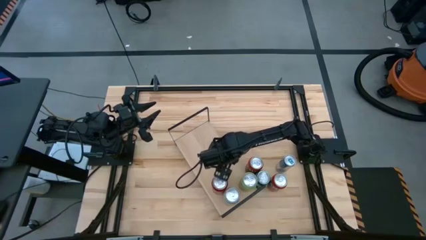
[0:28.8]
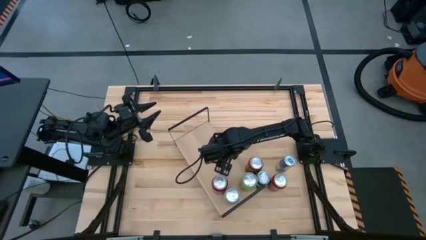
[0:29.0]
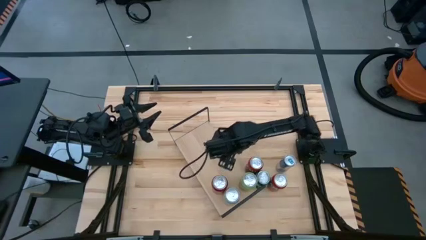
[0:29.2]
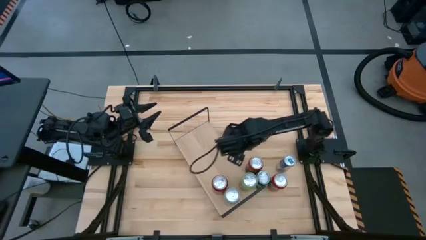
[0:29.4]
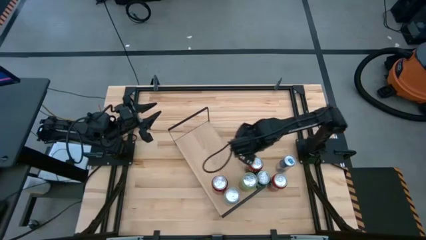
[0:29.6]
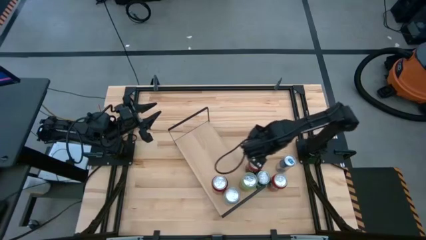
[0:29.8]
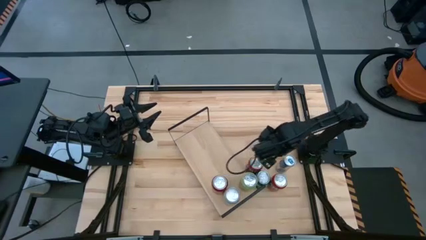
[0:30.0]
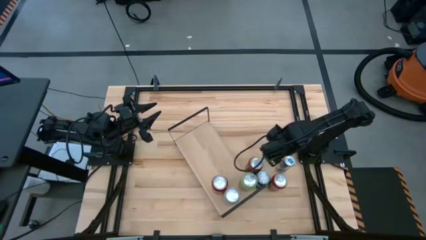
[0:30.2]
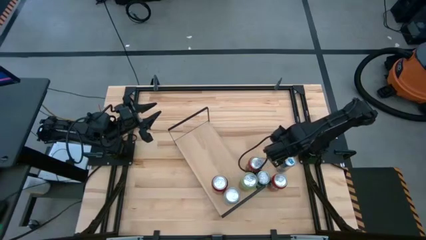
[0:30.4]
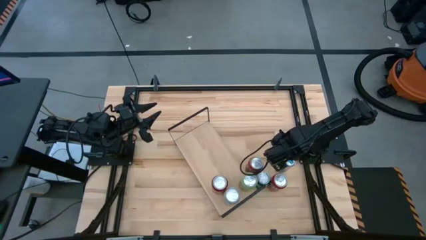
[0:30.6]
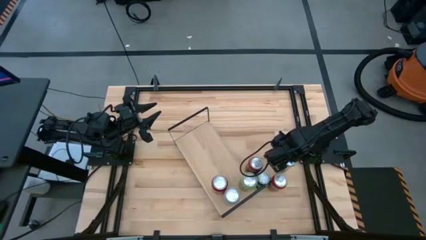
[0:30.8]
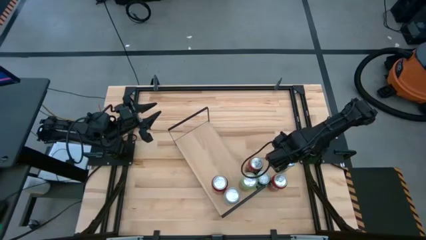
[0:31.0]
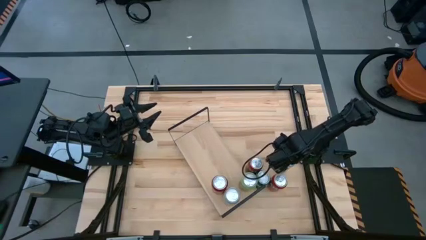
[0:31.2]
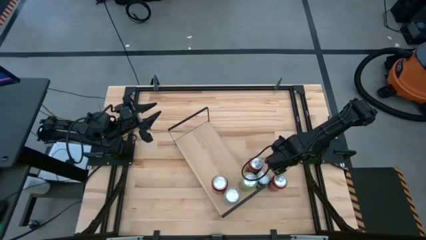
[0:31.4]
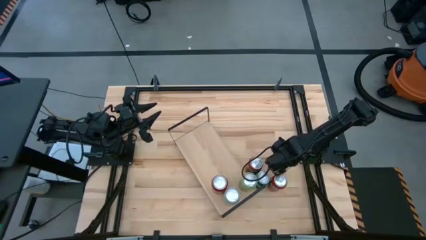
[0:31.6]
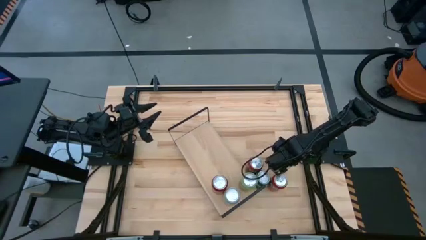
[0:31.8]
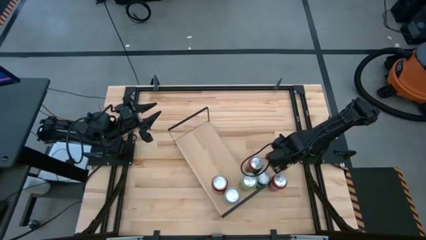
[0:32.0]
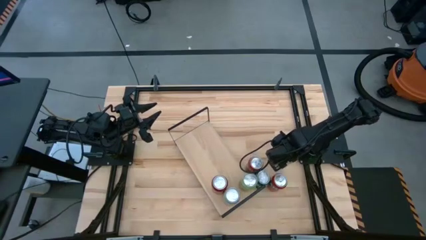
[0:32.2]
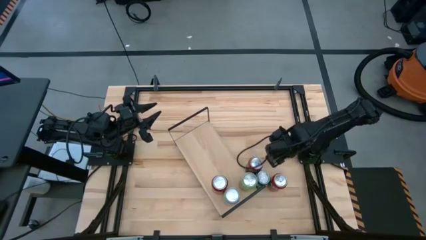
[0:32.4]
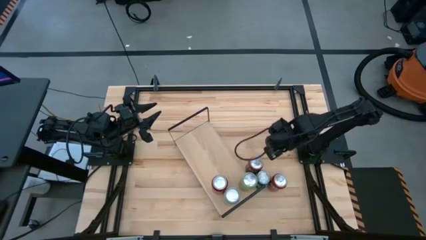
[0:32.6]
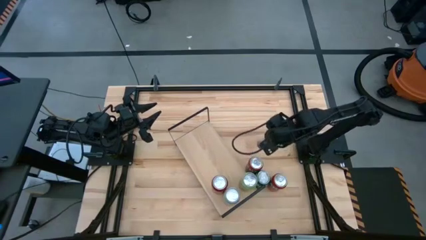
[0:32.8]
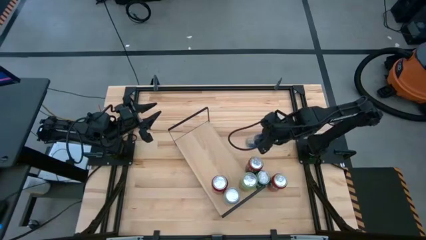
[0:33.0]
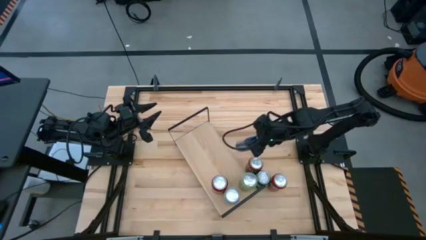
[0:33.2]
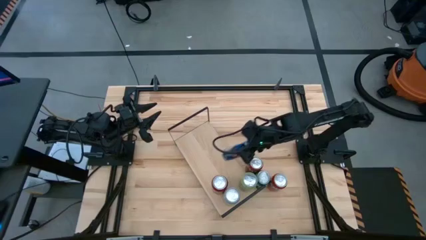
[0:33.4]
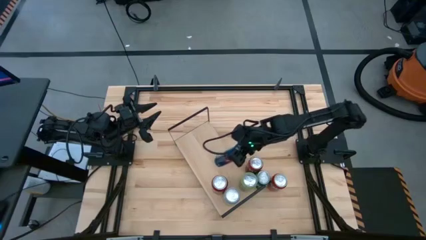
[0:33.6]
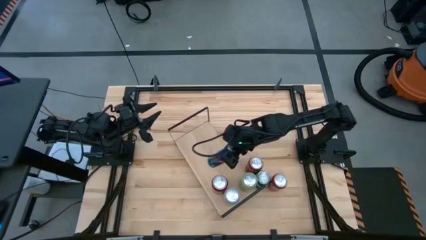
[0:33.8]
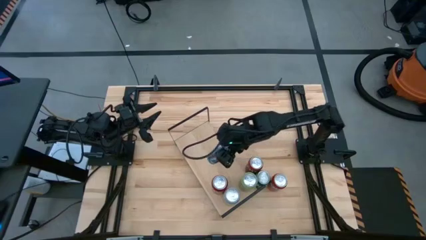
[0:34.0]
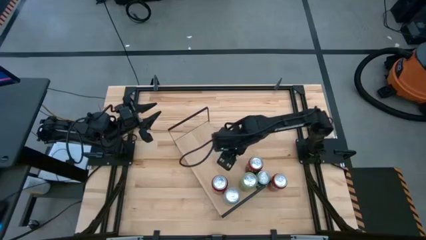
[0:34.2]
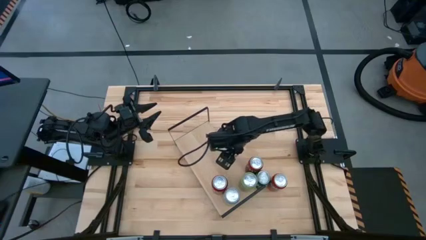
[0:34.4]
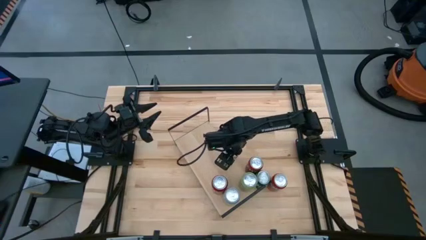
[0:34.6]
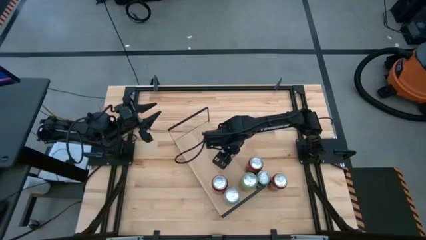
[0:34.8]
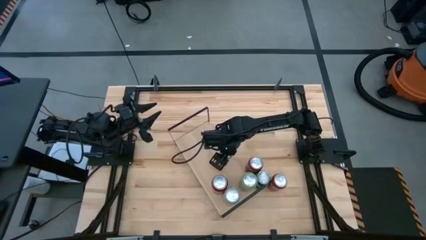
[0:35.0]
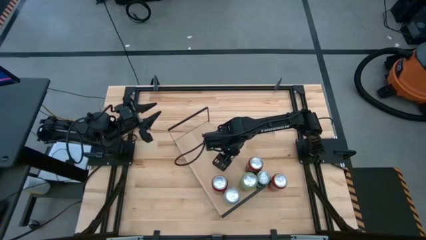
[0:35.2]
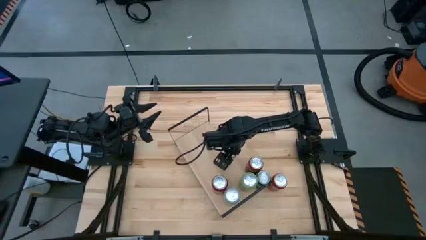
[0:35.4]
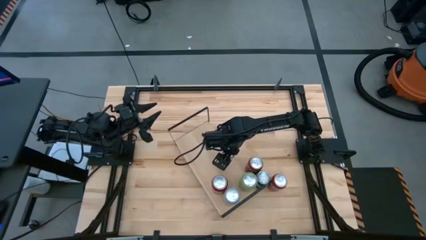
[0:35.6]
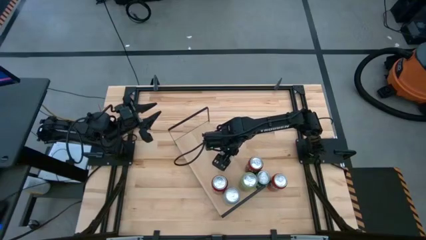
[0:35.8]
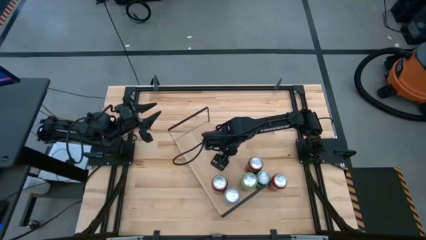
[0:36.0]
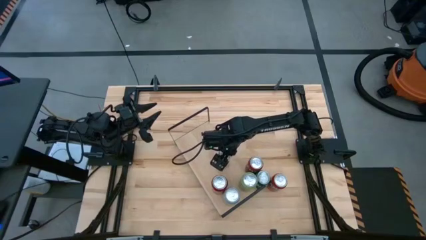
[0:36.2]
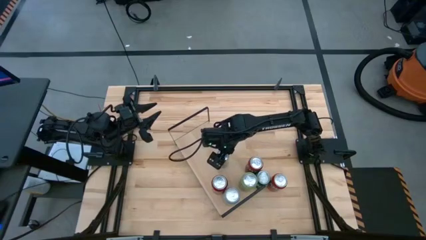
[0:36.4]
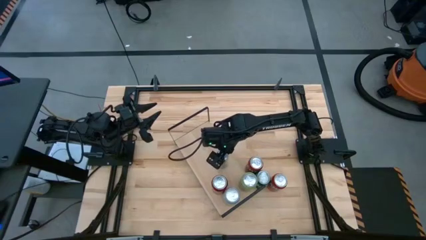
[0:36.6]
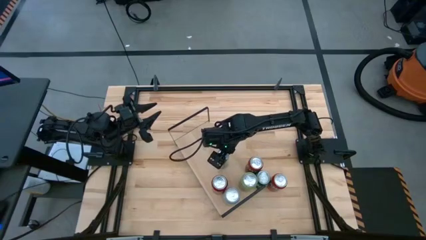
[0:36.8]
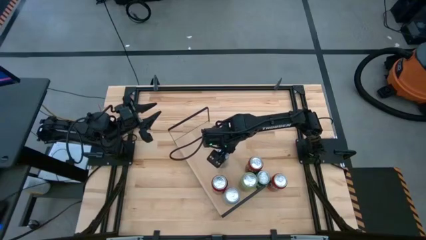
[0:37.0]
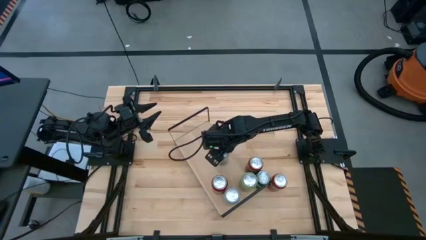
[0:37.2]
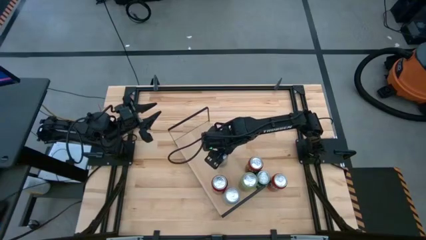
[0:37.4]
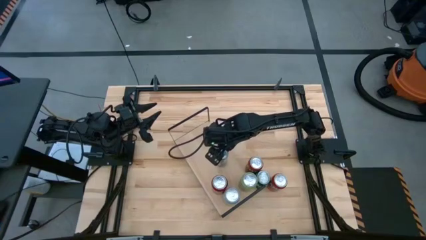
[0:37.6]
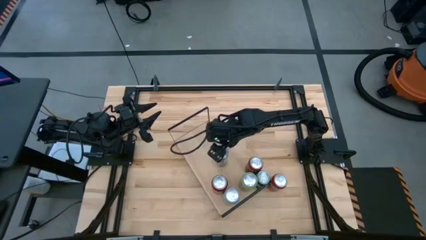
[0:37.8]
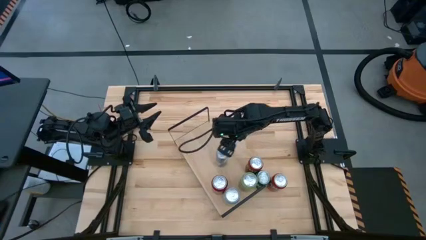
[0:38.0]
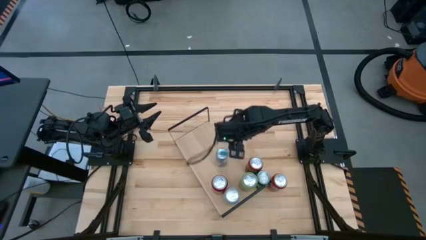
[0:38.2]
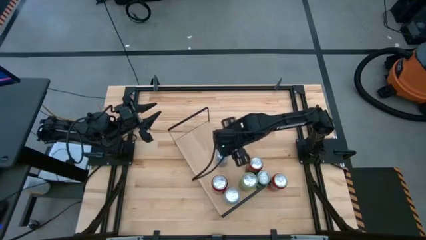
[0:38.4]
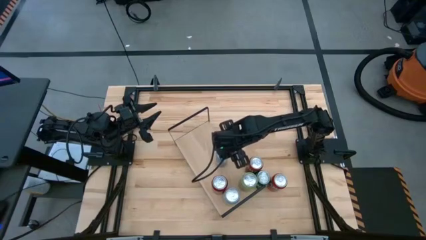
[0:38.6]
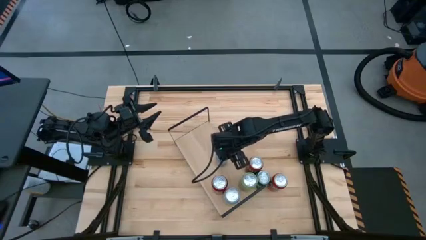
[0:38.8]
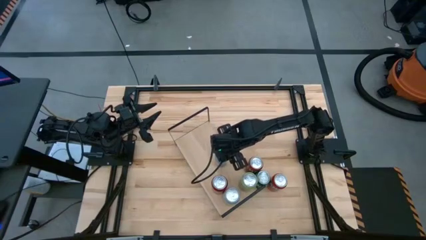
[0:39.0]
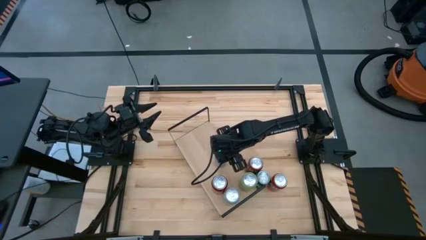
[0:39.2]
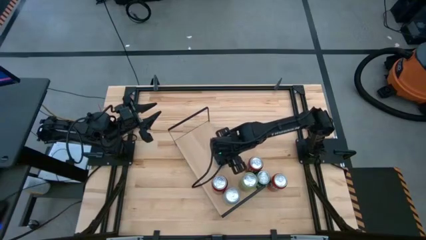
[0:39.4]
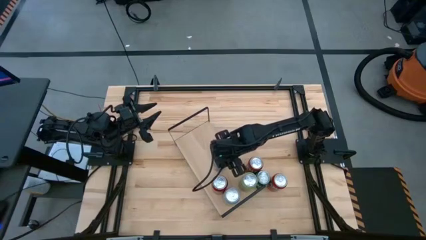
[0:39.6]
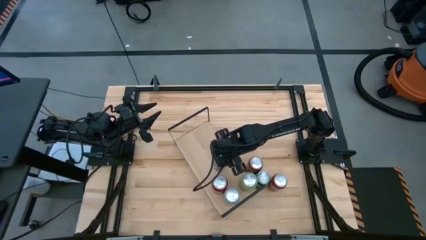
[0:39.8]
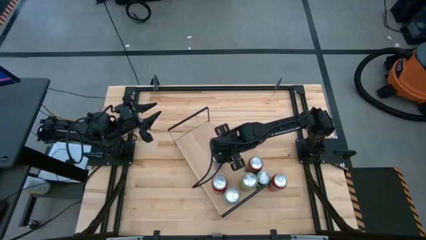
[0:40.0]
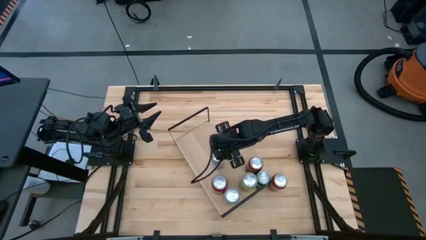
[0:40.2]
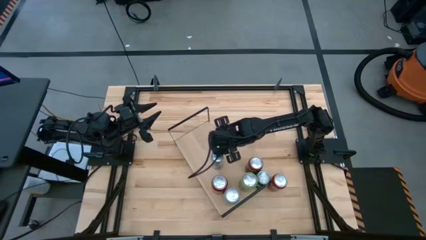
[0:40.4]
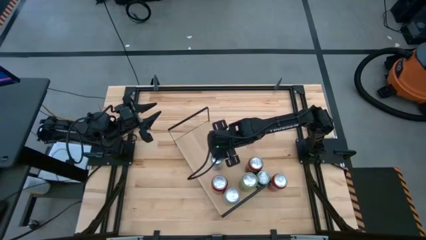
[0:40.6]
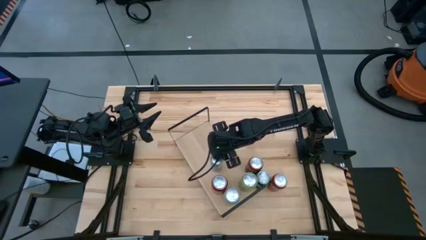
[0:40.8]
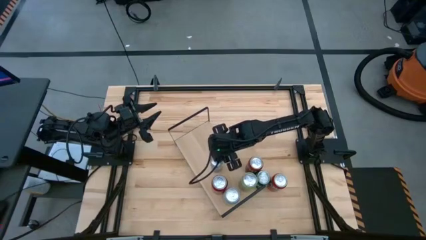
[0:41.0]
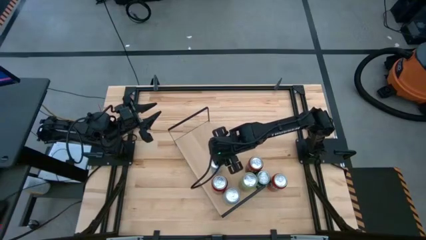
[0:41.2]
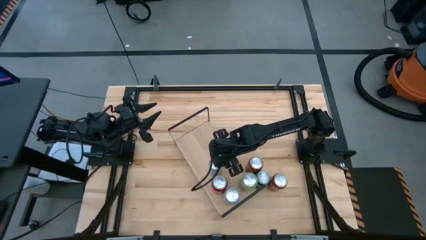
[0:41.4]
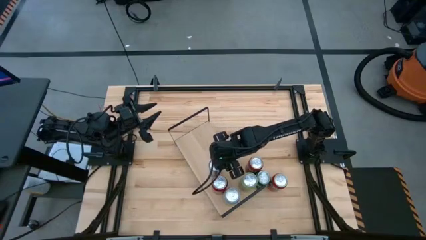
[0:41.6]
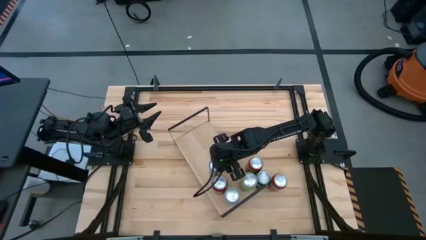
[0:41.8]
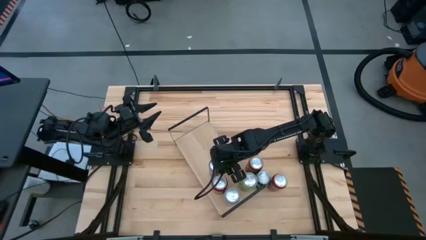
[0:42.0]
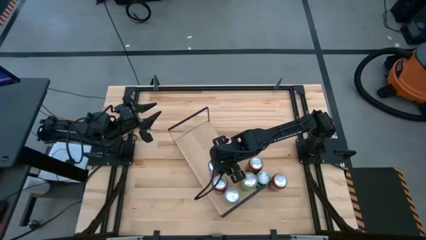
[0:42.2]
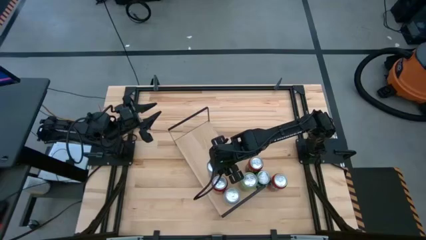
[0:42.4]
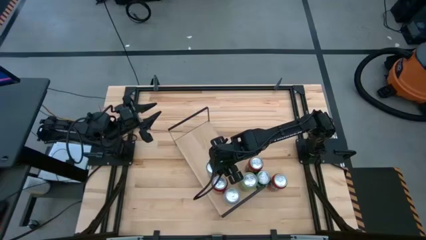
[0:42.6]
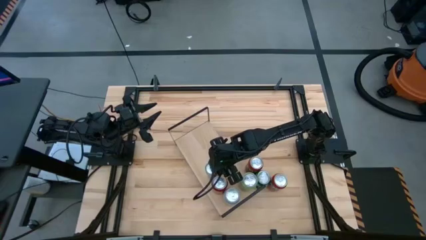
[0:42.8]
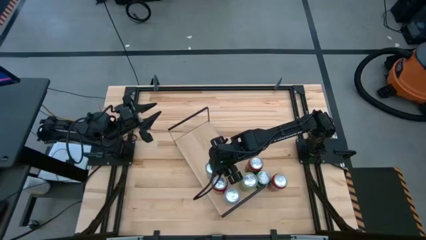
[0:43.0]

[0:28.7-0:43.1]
Task: Place canned beverage on shelf
Put the blue soda can on the shelf

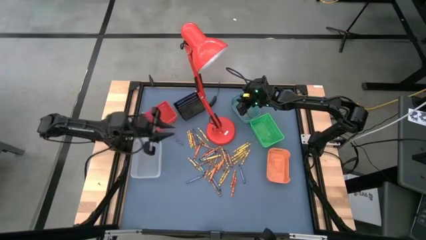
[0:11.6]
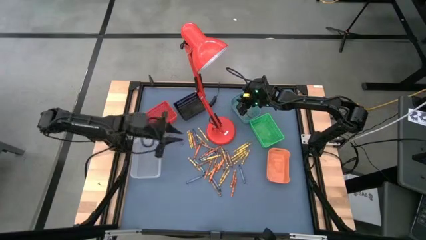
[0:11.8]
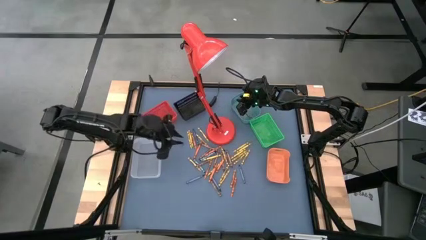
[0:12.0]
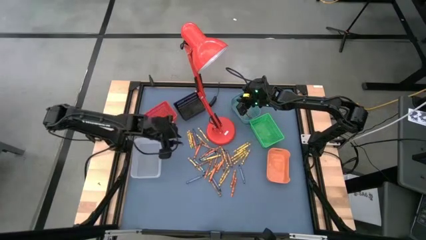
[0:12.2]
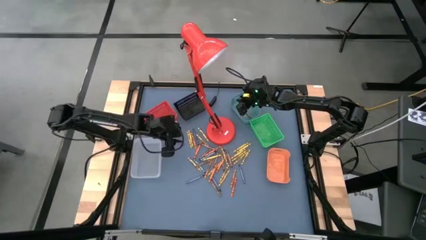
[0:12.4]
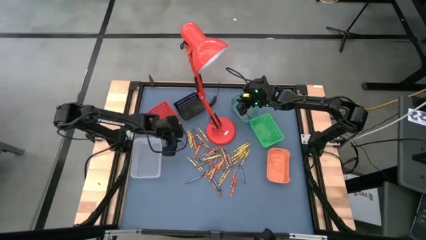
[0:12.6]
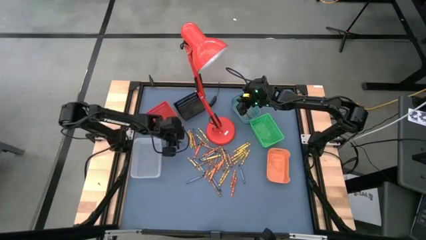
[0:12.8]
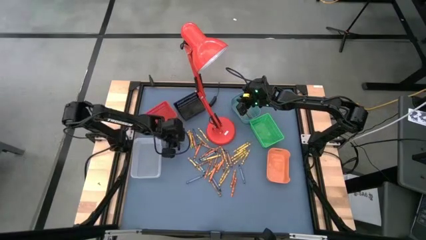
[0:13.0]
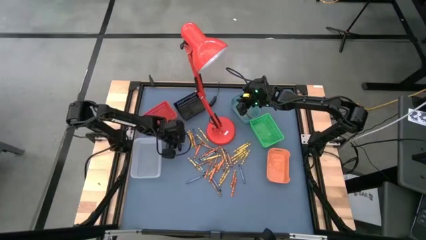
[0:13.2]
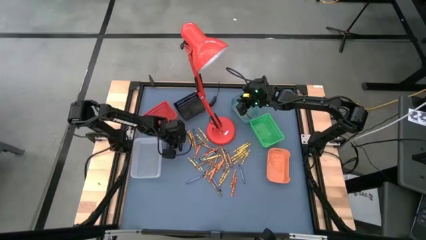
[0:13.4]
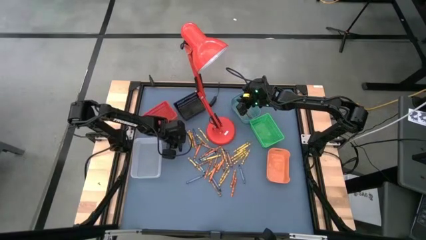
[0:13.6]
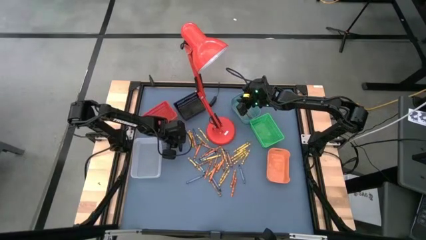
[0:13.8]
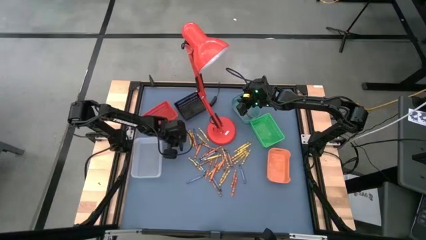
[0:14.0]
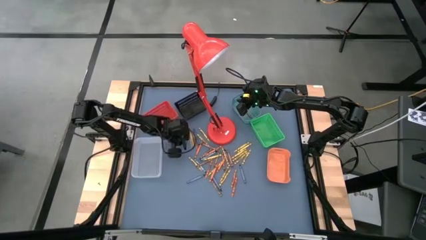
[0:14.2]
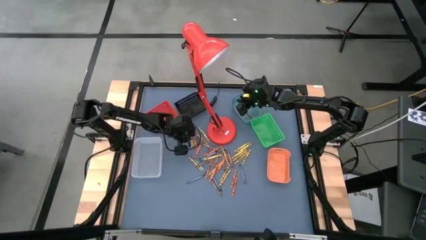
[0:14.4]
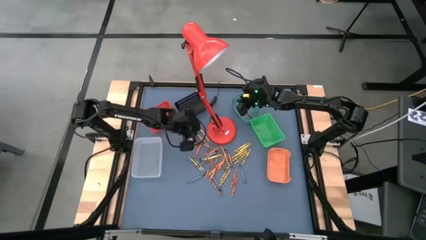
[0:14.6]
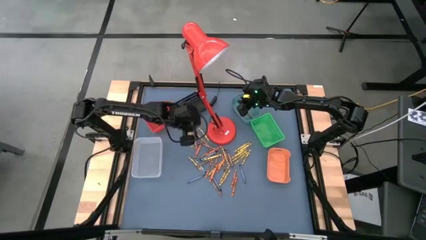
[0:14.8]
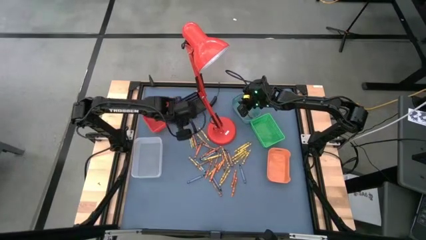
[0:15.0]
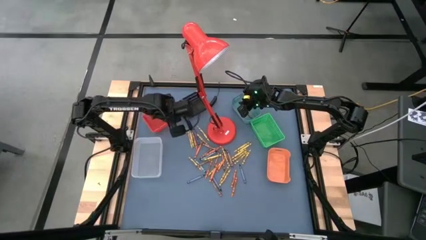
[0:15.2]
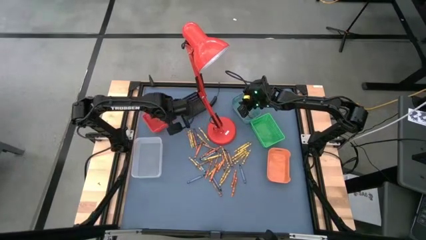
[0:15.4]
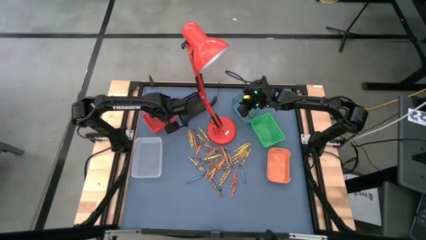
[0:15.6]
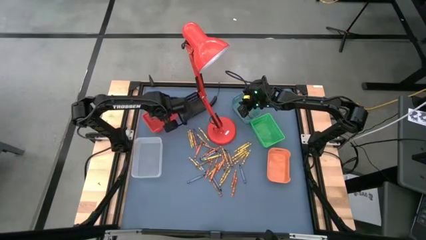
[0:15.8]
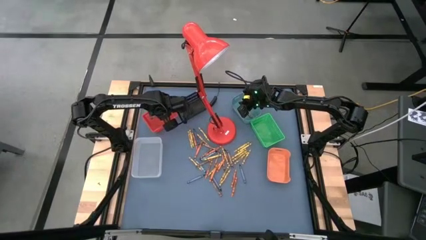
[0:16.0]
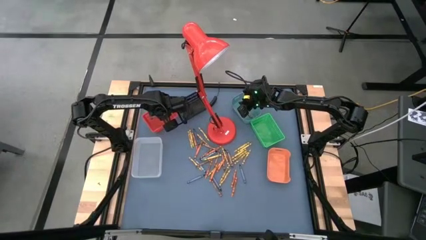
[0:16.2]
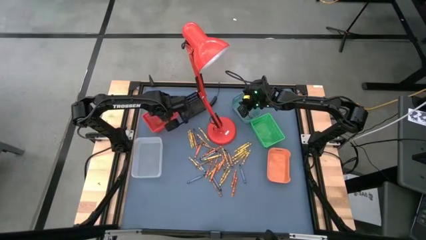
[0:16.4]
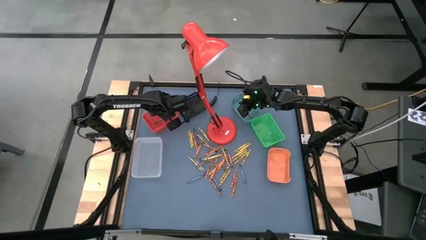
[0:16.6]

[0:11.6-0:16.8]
Task: Sort crayons
Put the blue crayon into the middle left red bin
